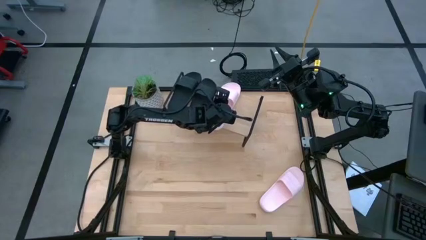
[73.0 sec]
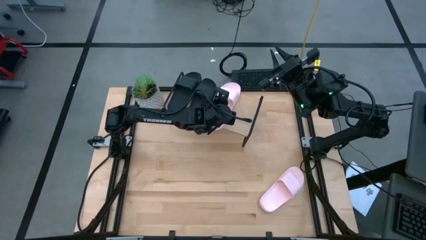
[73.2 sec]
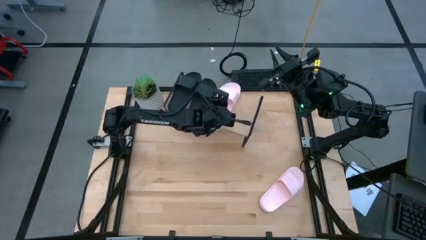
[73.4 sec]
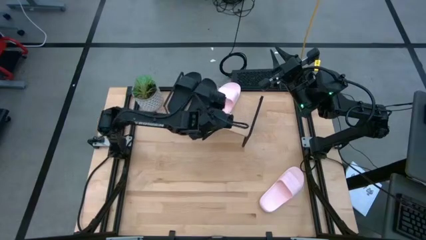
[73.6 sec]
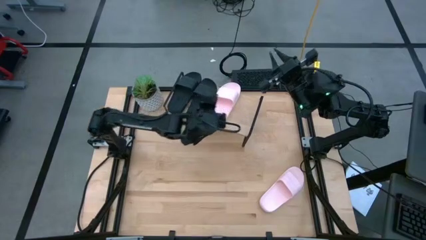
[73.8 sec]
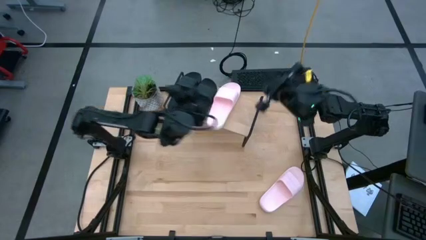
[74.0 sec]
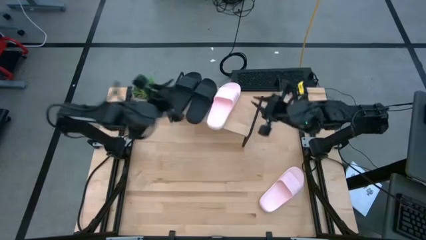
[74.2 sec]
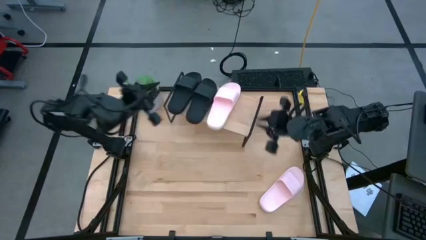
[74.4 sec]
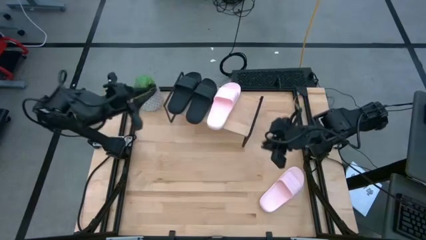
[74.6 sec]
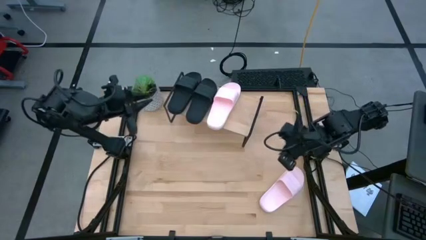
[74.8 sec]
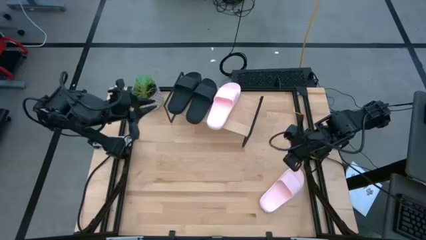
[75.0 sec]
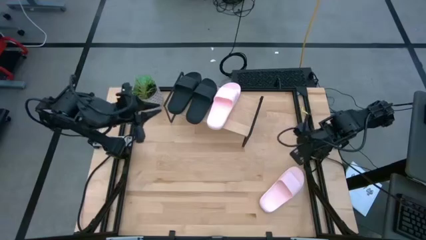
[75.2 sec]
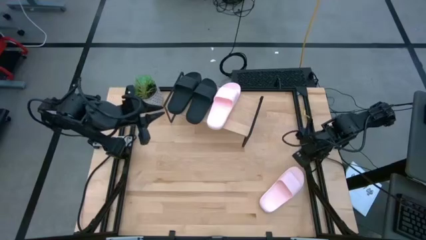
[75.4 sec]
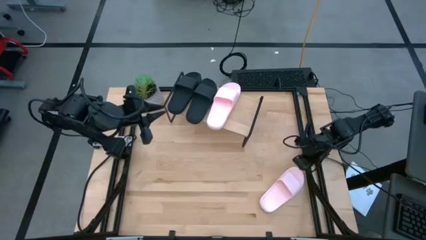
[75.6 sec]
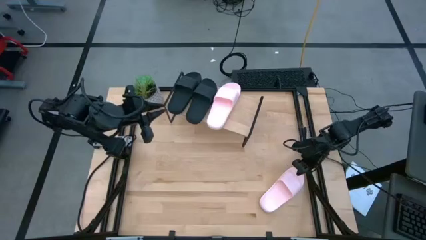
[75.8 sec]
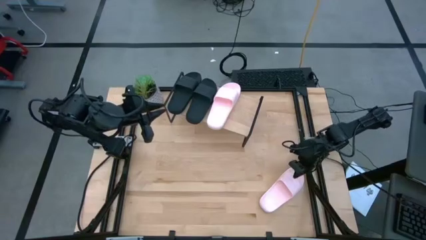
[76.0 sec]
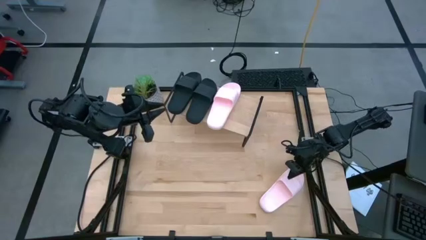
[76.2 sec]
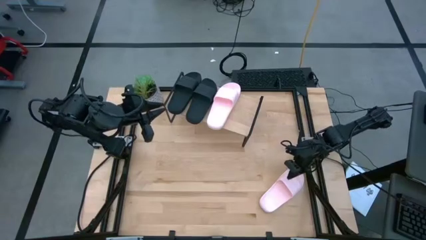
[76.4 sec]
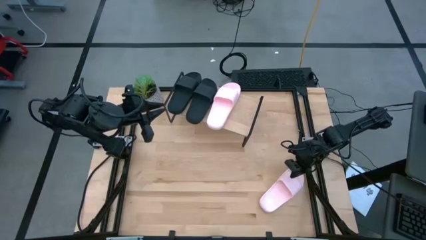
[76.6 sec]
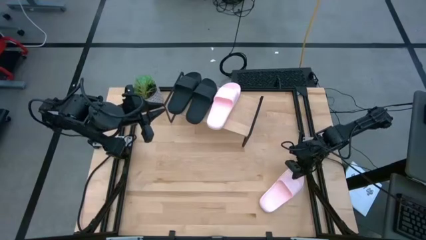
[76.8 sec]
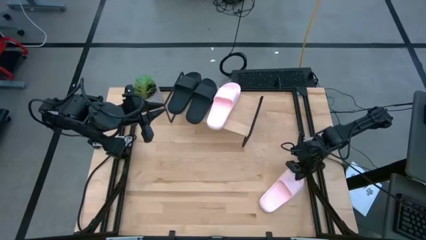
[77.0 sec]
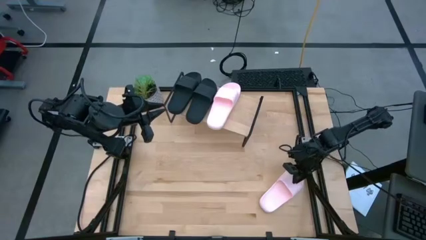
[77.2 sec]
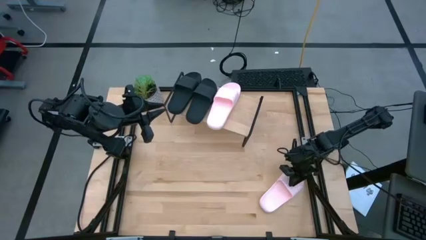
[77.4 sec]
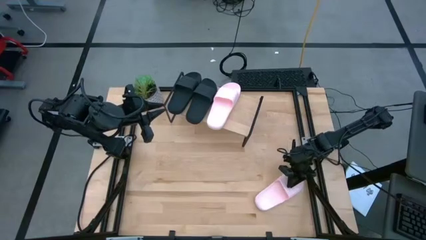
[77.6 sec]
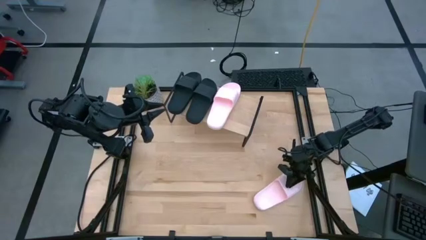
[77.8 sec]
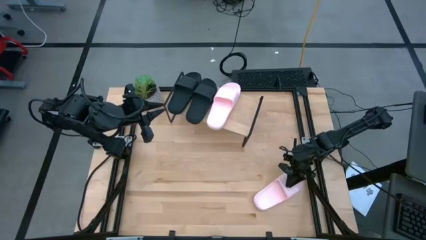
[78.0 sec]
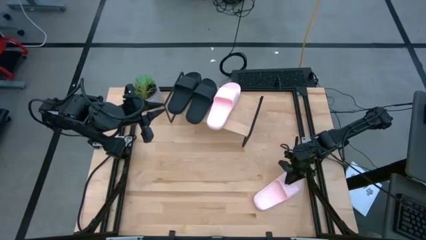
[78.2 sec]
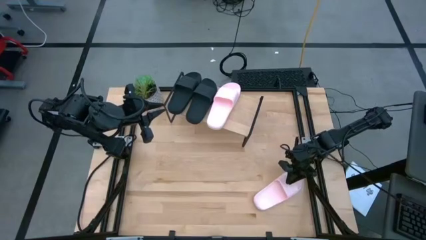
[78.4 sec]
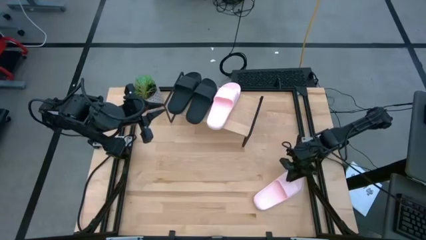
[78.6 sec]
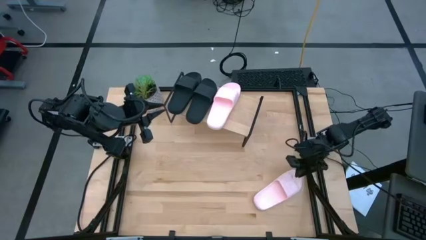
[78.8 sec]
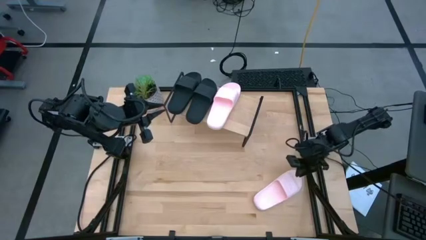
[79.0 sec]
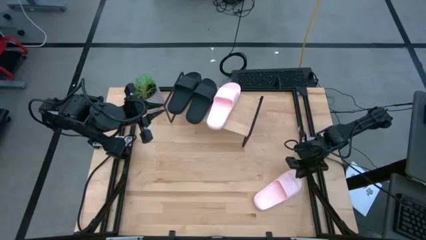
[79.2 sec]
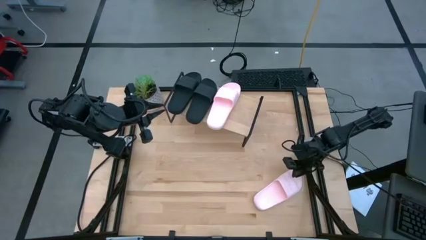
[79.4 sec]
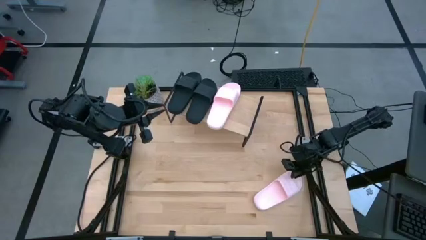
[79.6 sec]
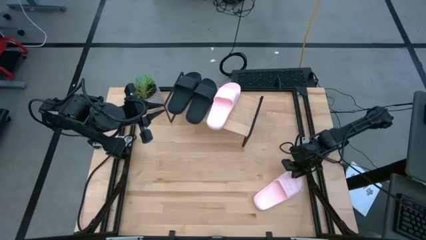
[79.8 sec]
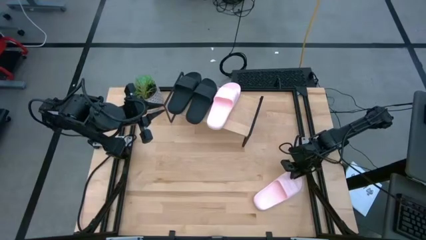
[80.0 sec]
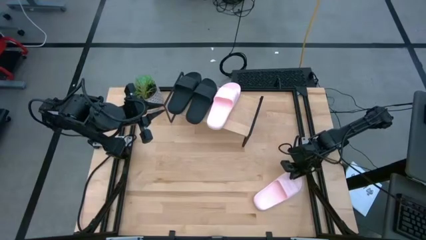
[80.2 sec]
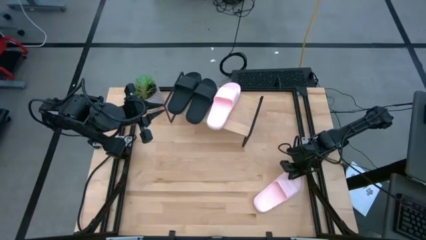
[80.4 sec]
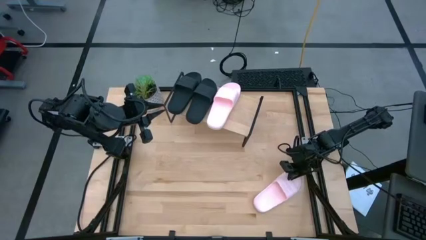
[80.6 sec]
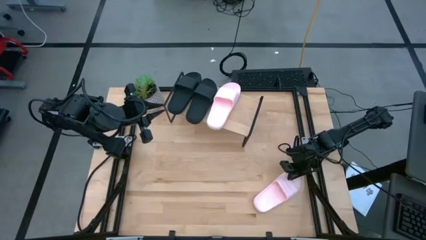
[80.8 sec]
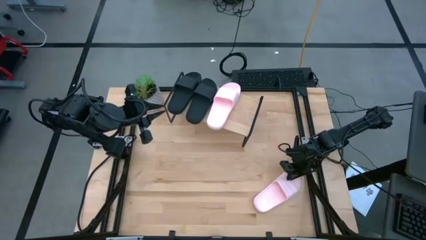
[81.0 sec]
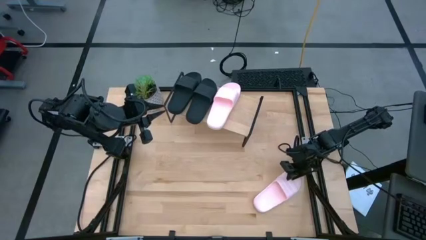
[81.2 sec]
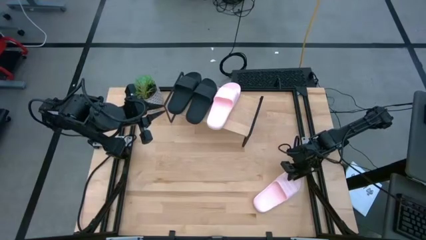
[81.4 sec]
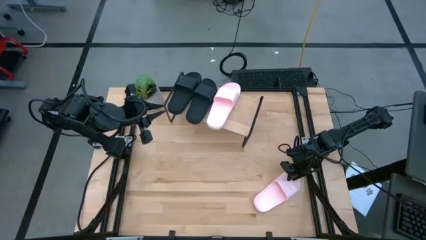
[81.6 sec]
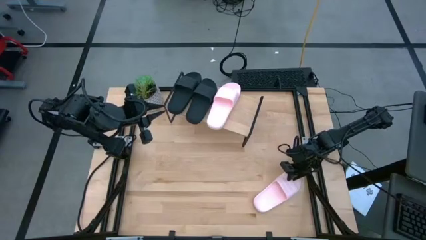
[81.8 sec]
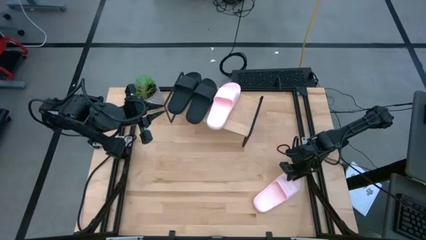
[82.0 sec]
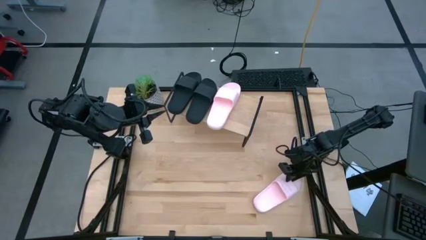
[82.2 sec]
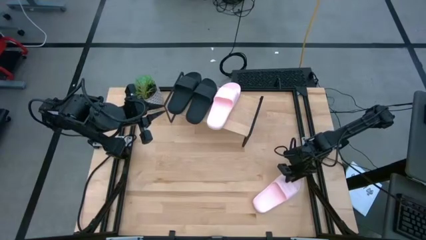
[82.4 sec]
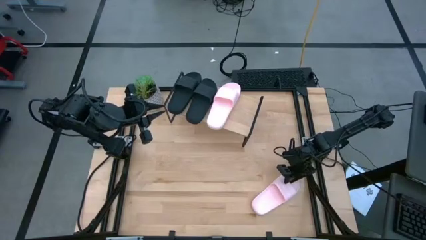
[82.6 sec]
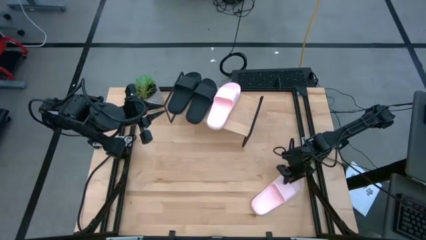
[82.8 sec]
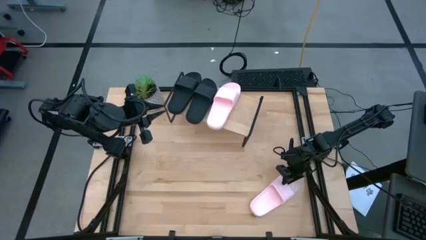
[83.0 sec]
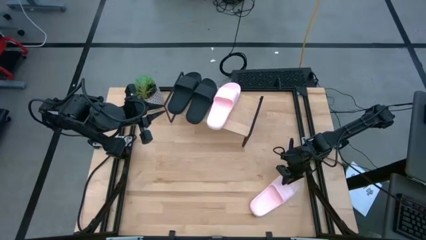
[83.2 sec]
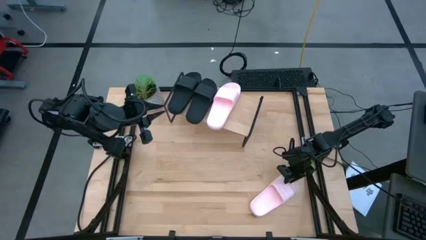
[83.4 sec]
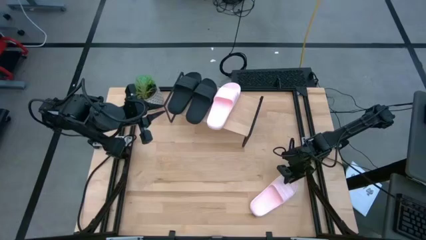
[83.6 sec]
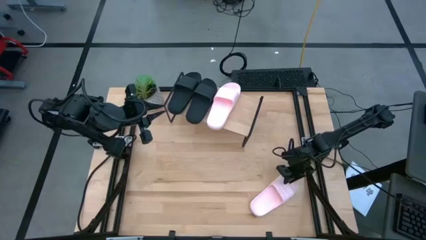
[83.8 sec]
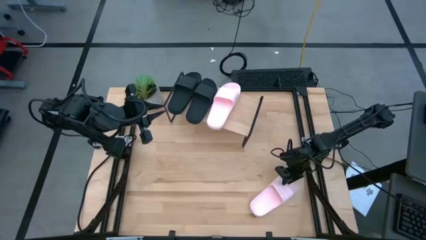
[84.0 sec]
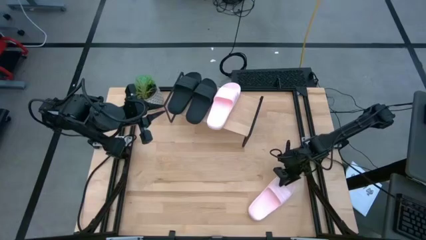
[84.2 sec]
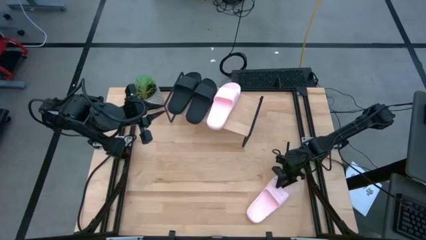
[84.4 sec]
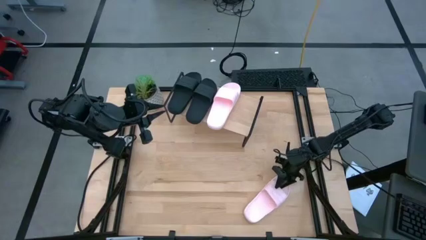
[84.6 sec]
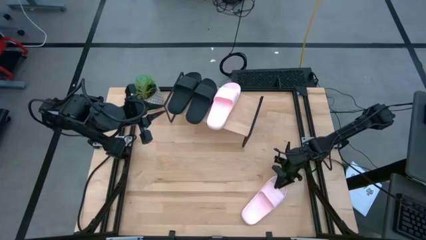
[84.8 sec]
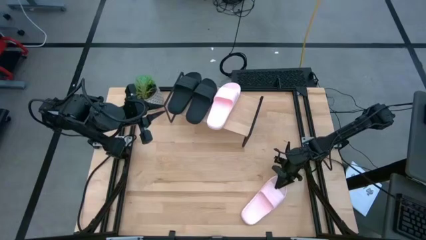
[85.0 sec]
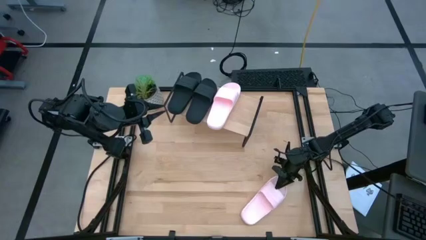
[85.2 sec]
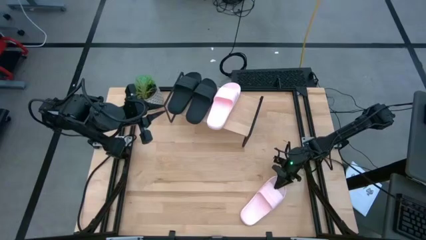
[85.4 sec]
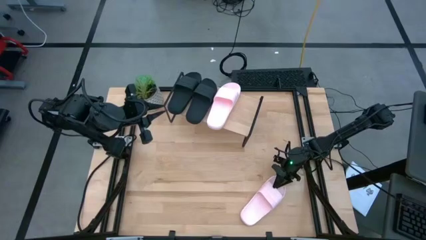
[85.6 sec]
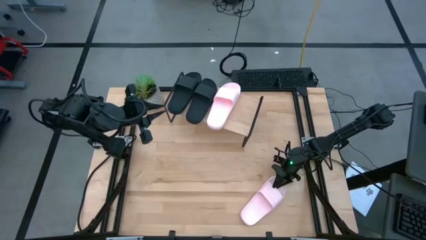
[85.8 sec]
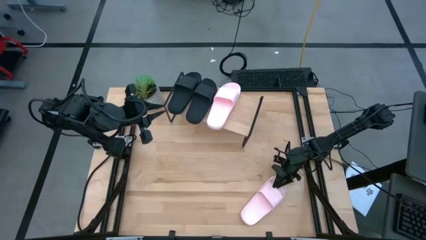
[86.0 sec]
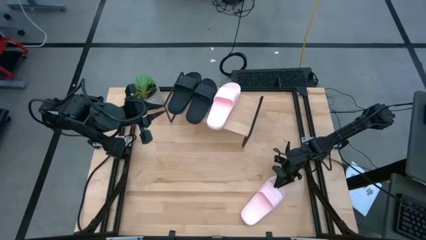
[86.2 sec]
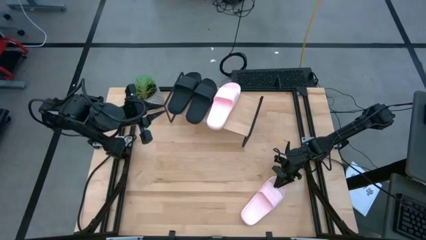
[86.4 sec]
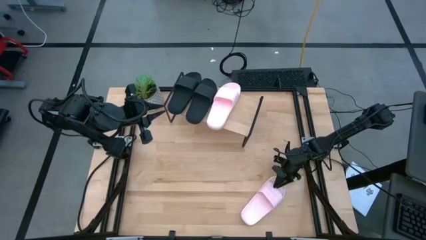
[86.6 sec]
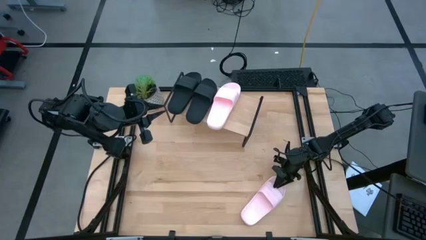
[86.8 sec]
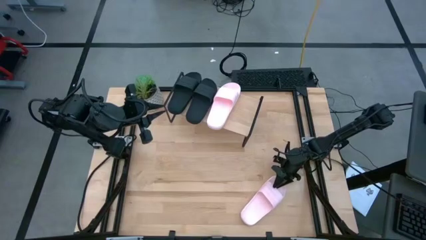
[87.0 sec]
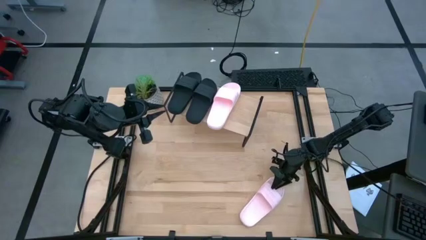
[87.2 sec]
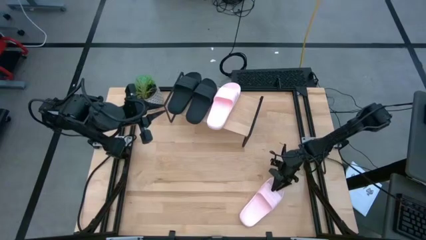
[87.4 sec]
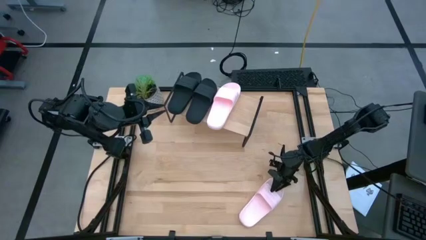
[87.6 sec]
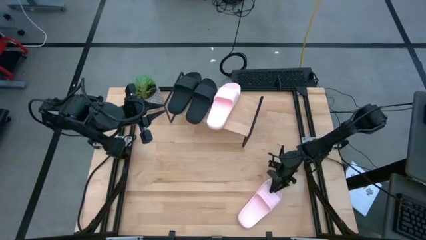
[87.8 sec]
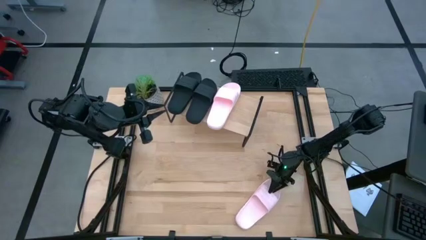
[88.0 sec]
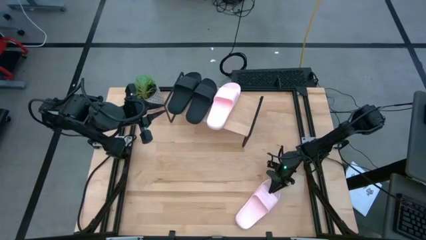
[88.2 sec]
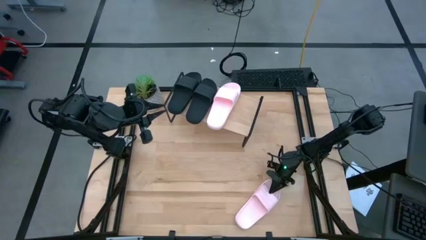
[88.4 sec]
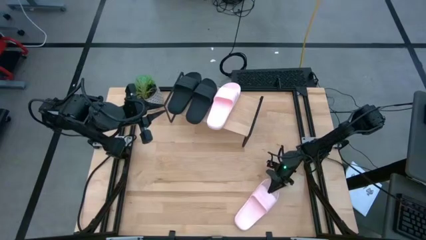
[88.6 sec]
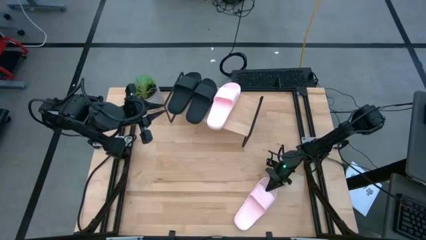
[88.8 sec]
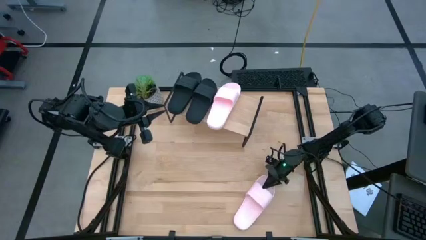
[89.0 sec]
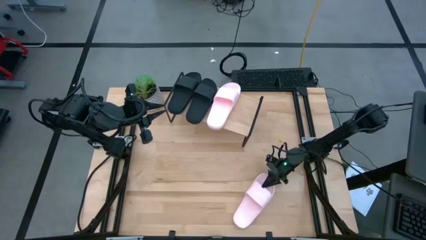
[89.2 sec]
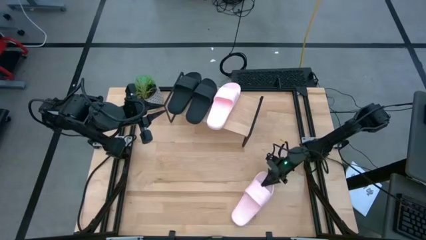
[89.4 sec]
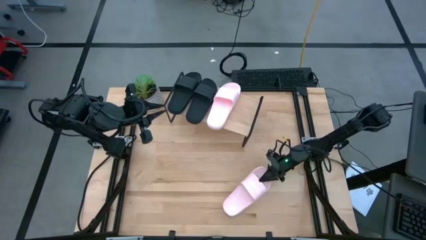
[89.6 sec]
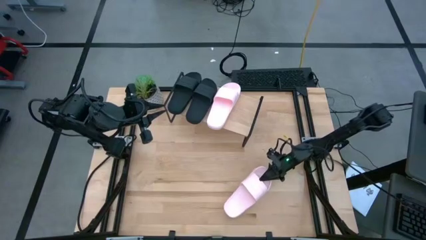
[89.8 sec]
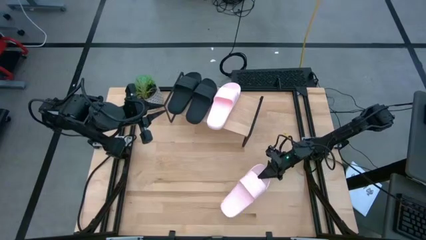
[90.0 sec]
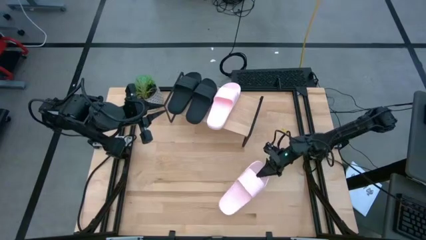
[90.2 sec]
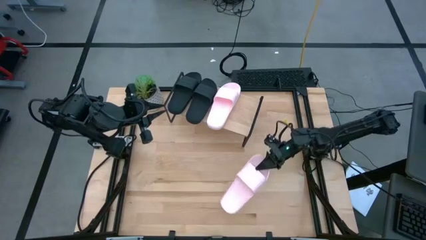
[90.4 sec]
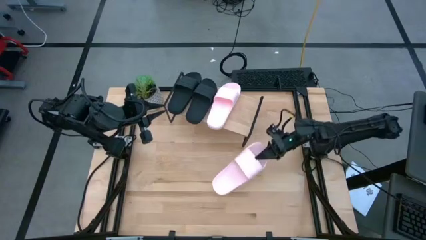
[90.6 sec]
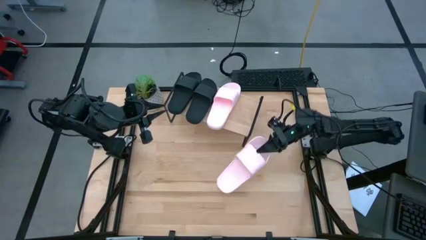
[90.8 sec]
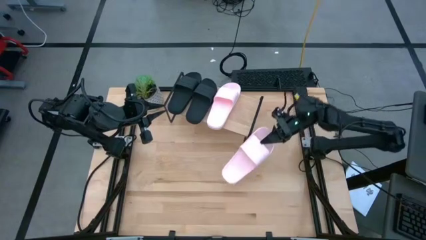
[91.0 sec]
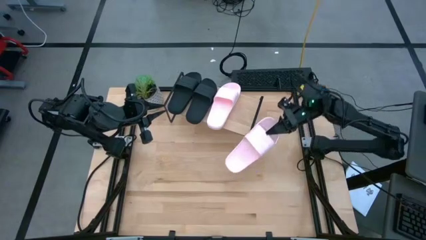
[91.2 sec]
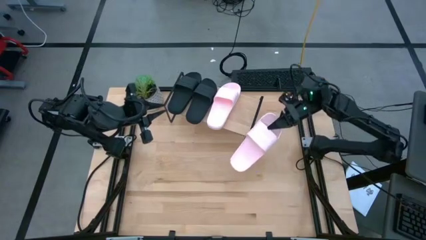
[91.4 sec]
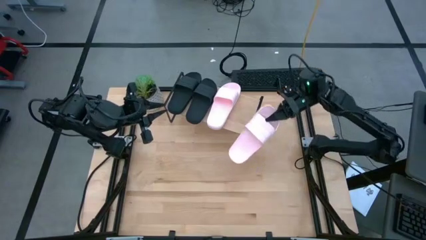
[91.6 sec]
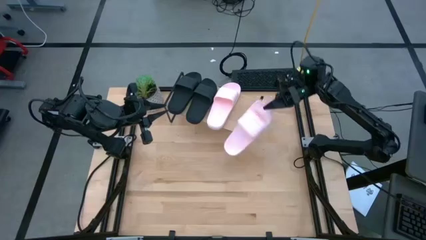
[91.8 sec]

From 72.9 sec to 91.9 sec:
Task: Pick and place slides into the shelf
Put the pink slipper on the shelf
